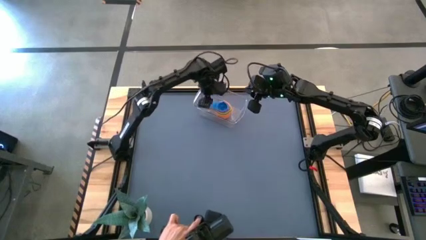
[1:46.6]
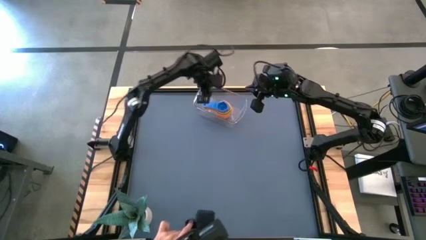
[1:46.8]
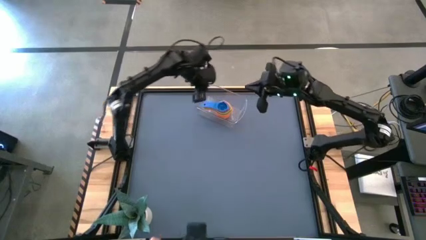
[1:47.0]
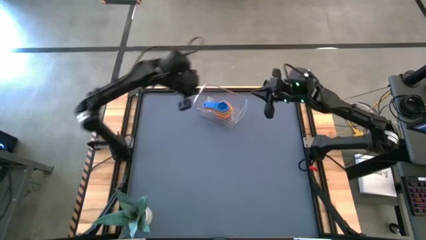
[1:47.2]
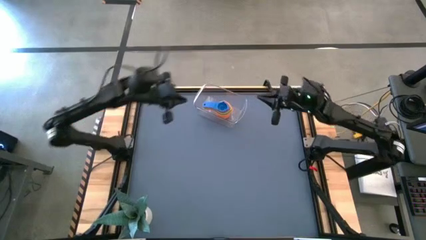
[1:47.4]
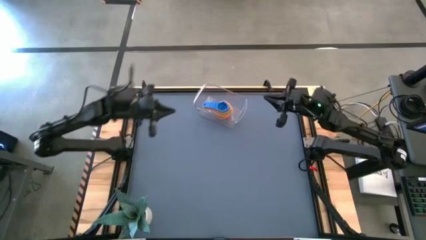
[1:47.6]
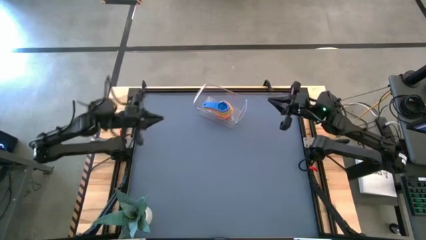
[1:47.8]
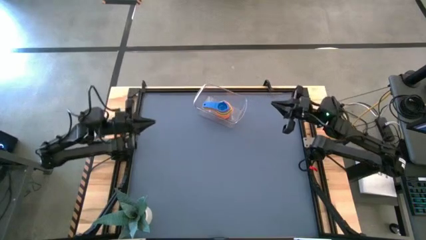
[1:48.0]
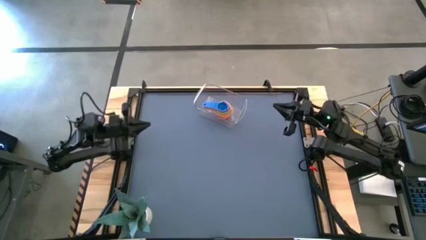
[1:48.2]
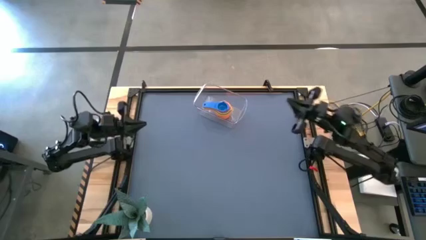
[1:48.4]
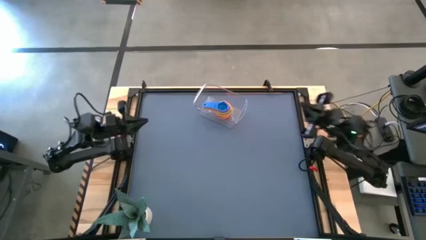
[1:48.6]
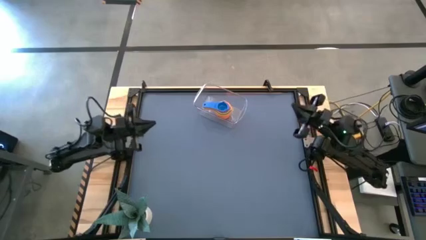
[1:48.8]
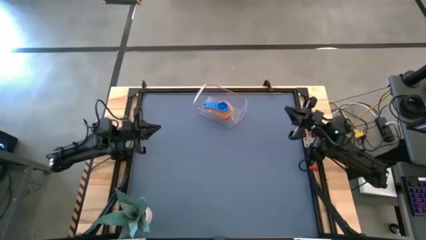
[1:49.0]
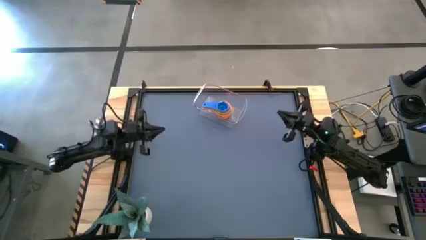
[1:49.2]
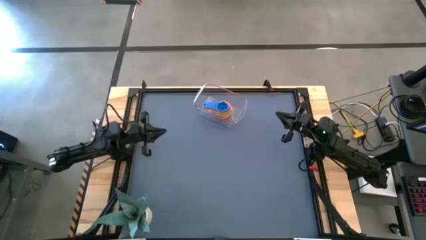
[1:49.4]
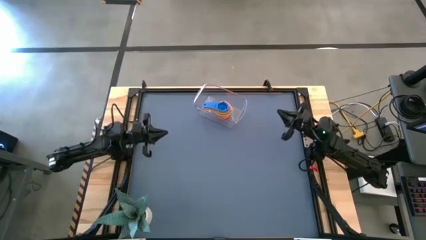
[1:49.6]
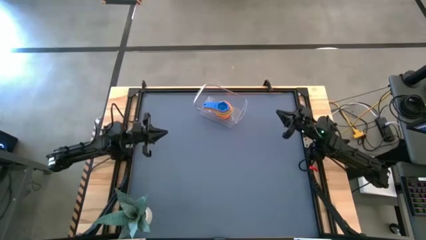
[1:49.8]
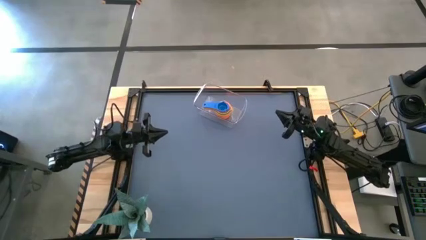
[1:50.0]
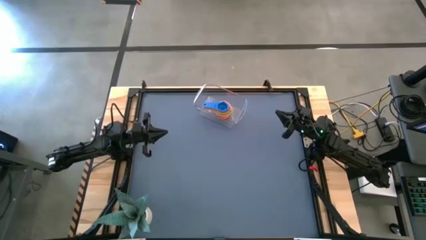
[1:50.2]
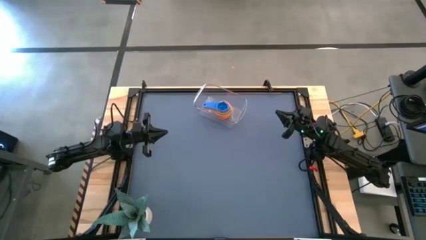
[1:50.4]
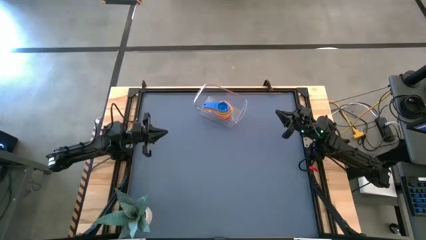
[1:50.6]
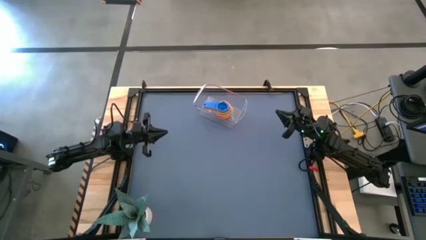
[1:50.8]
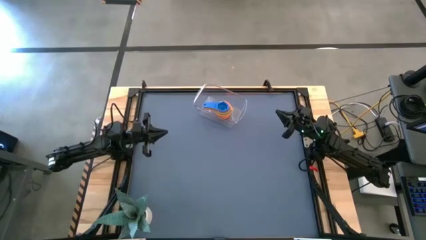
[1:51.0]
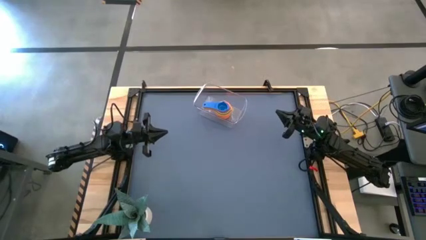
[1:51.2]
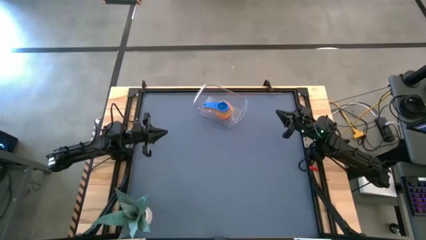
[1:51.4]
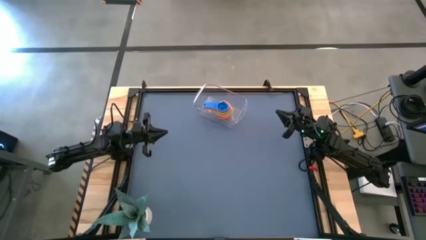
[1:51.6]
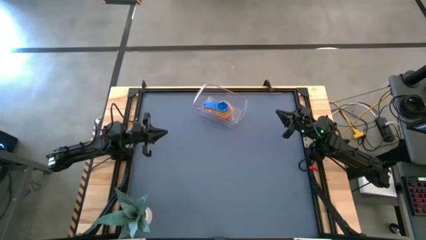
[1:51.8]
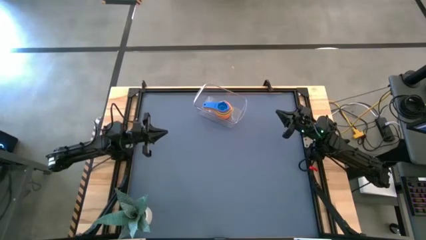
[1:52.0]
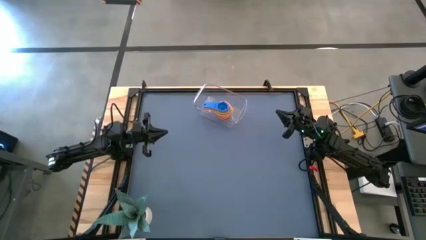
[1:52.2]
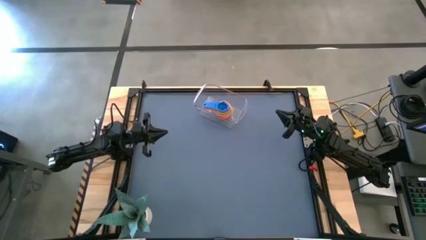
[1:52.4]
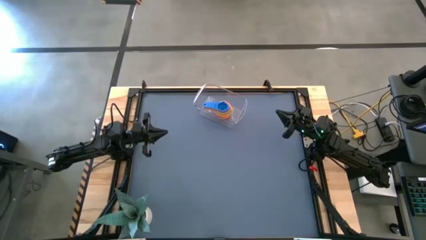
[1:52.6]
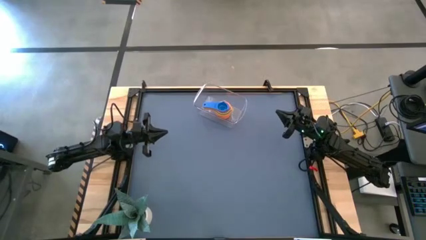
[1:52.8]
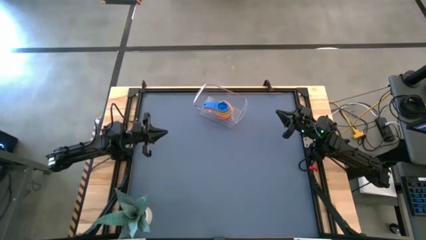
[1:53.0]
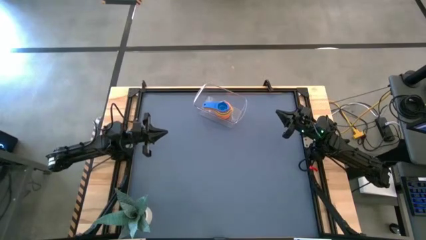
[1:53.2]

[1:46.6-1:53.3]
Task: Nest measuring cups in basket
Return to Home Position

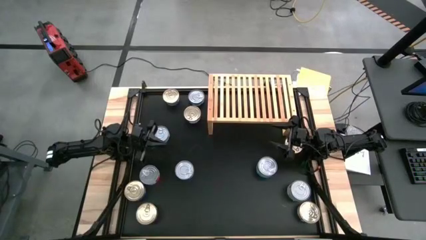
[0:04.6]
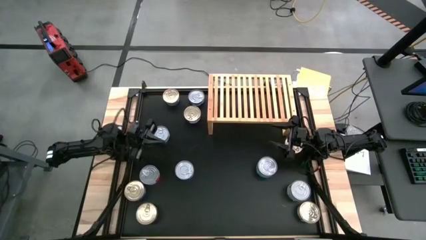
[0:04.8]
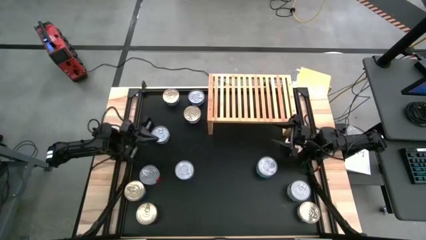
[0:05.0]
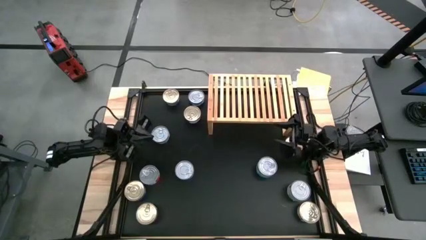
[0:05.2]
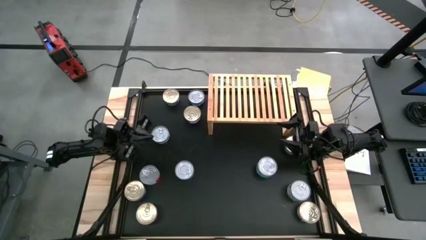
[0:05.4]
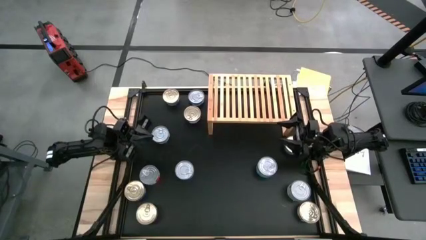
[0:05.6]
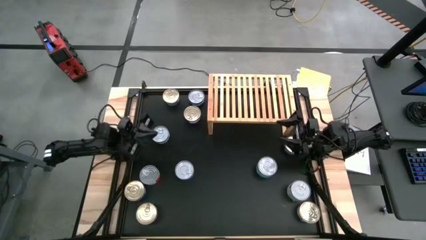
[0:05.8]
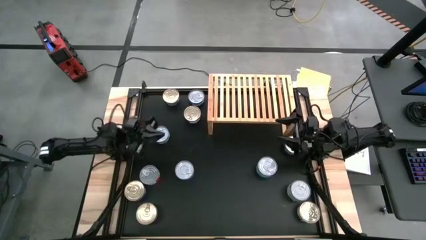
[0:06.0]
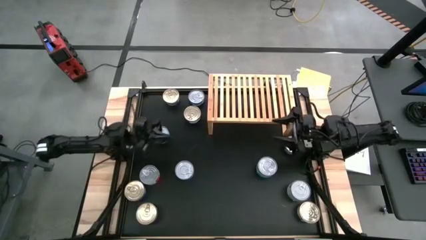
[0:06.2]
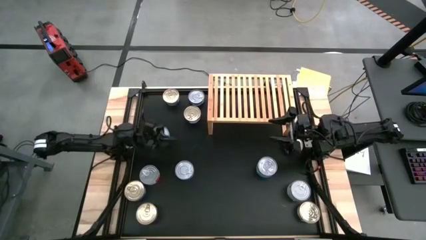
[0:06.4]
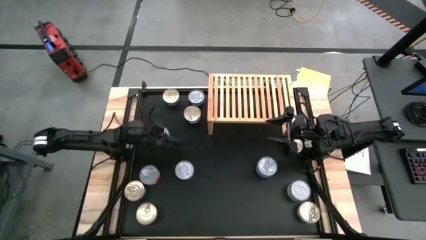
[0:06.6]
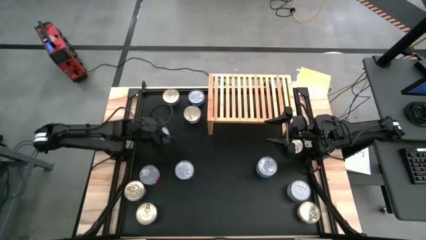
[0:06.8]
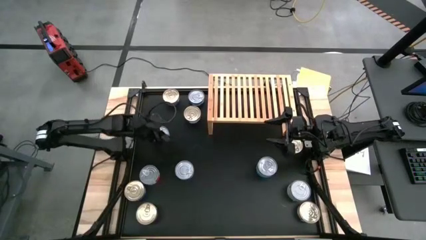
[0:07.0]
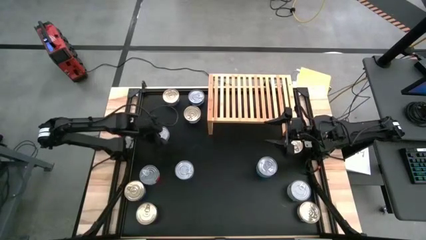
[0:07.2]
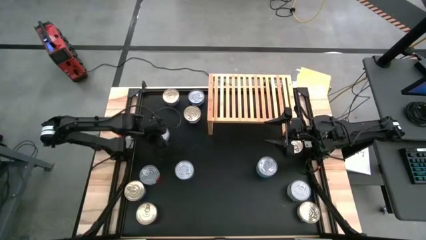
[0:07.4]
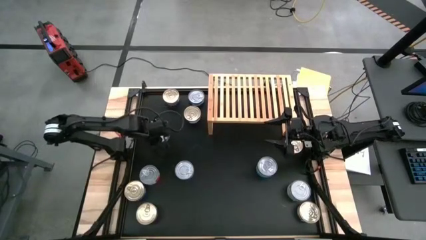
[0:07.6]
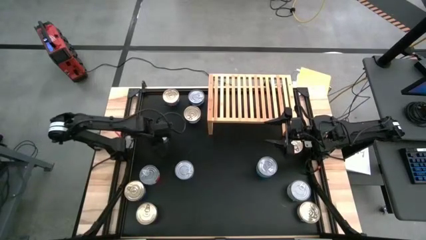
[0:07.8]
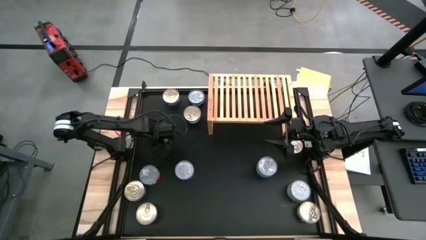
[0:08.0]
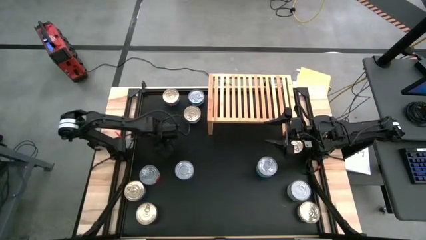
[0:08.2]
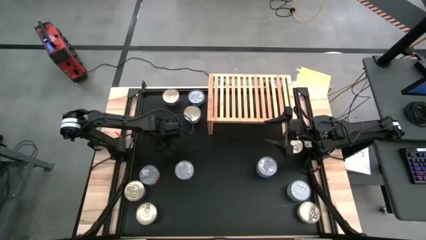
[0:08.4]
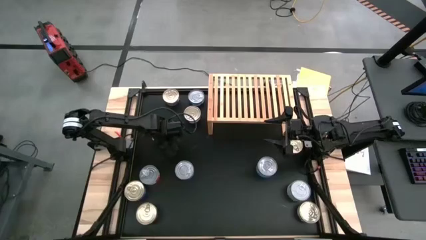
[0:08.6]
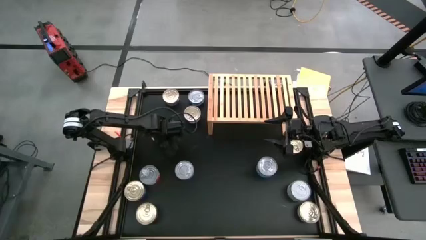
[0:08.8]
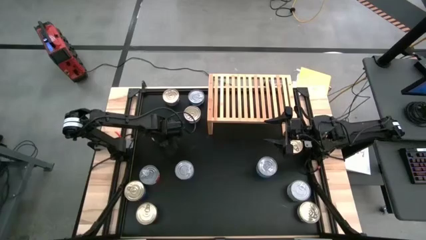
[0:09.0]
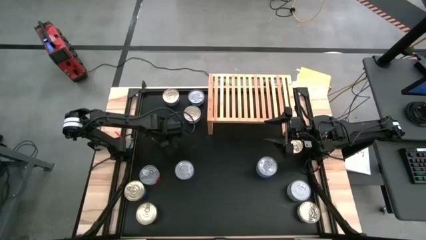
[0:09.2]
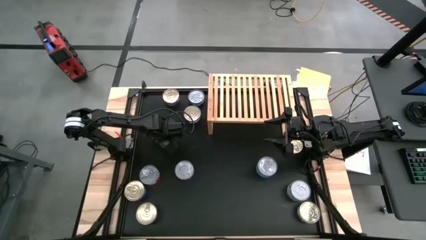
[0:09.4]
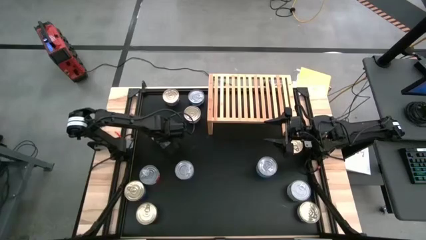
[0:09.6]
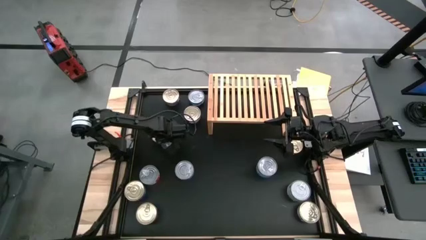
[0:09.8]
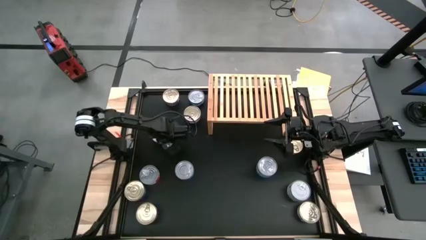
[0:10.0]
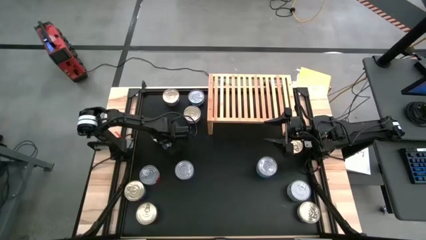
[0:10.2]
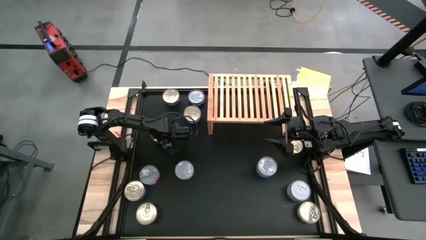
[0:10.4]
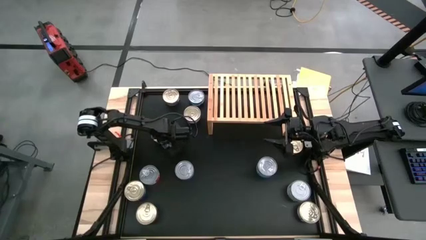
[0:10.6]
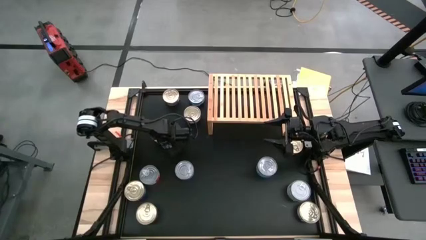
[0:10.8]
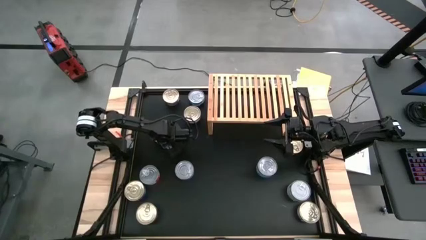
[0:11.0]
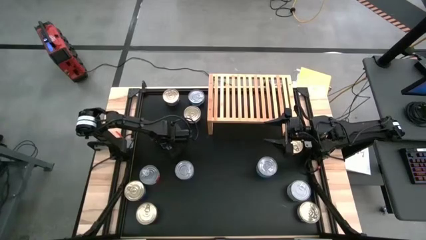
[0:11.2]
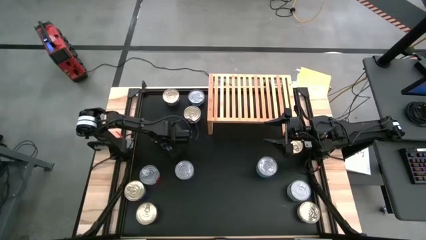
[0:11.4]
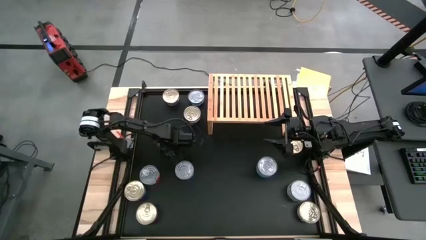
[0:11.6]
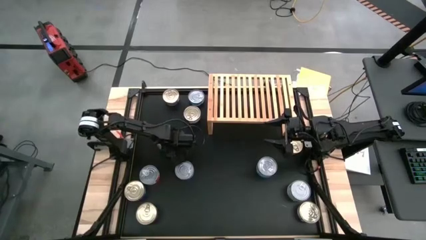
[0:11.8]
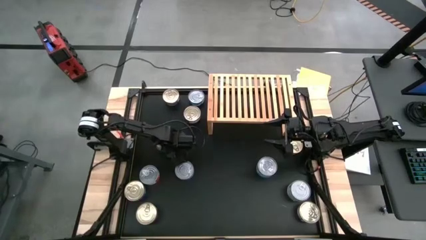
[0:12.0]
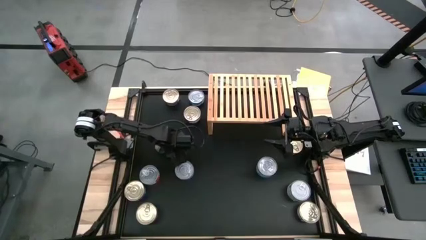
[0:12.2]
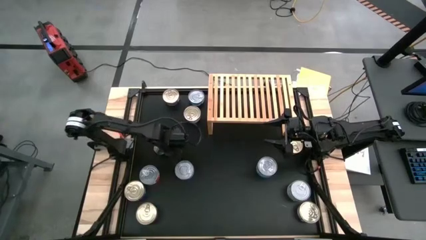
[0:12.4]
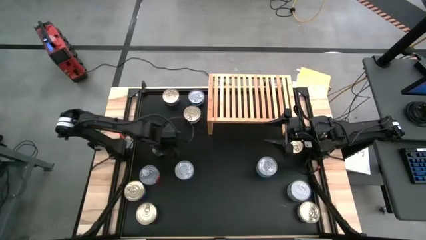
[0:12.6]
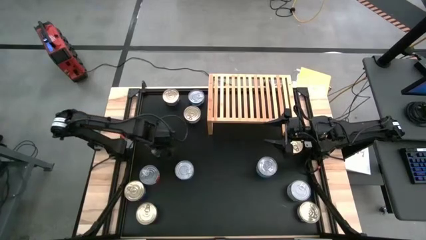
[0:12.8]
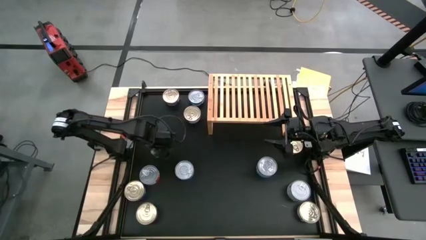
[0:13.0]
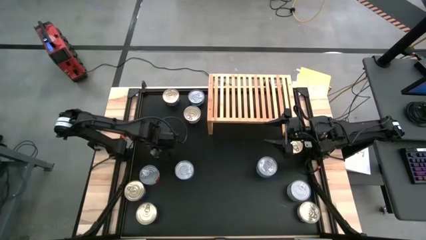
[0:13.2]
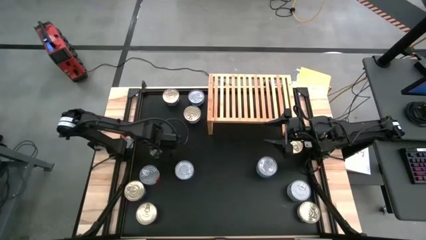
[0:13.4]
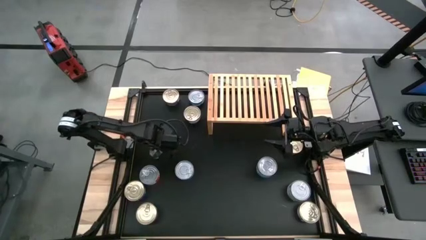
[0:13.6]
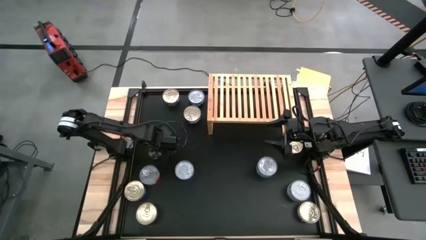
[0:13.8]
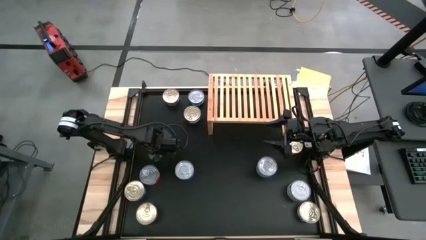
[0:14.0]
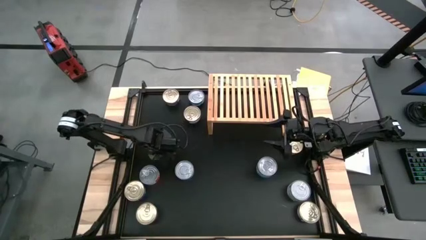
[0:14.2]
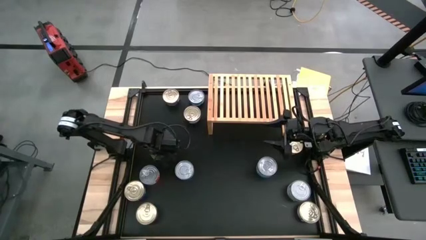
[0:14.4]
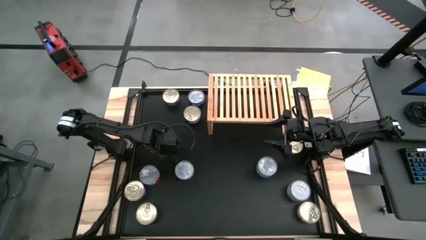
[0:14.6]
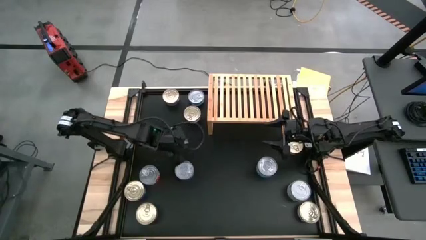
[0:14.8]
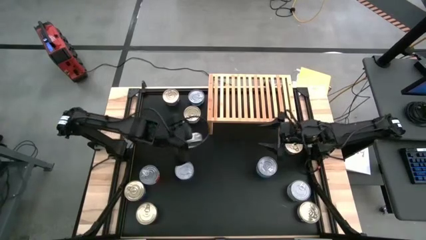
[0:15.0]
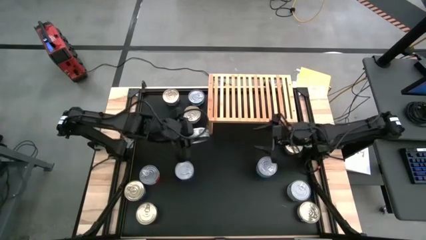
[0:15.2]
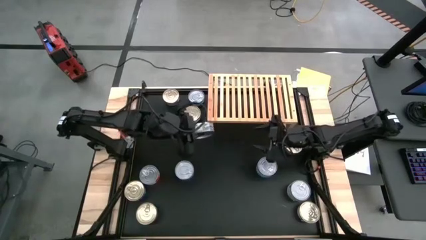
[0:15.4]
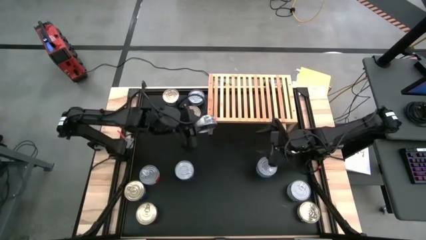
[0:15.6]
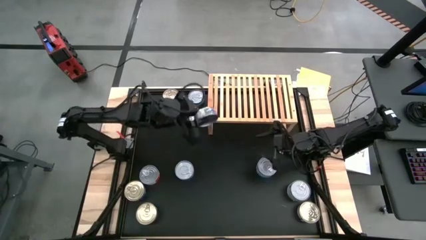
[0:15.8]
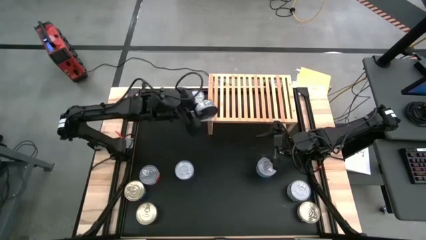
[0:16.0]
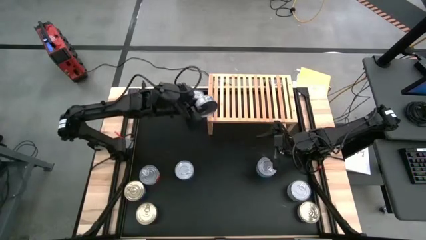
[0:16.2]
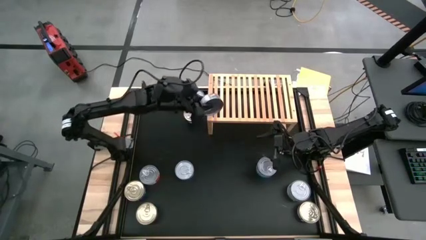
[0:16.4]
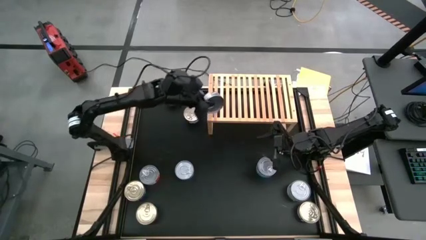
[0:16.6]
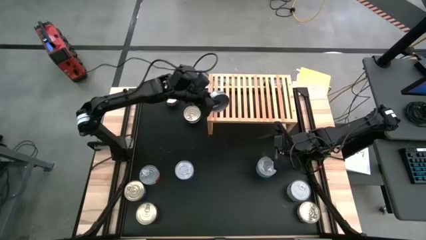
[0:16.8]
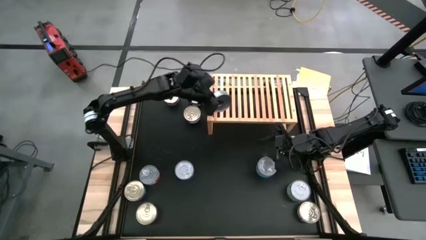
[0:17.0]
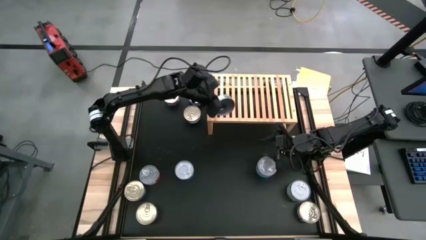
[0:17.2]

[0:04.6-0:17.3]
Task: Stack canned seafood by type on shelf
Put the green tuna can on the shelf
